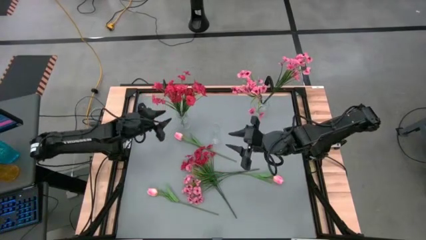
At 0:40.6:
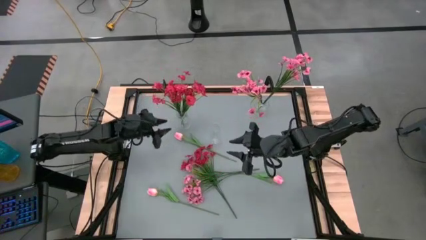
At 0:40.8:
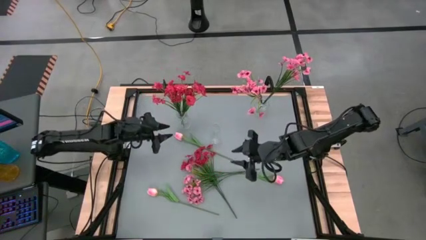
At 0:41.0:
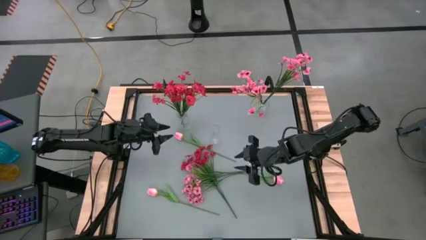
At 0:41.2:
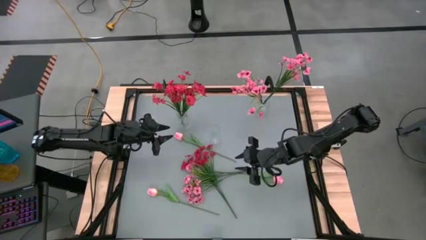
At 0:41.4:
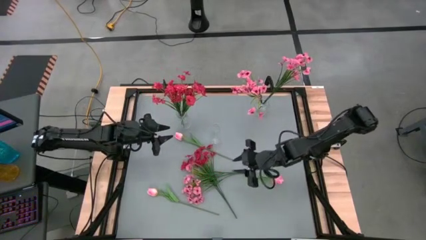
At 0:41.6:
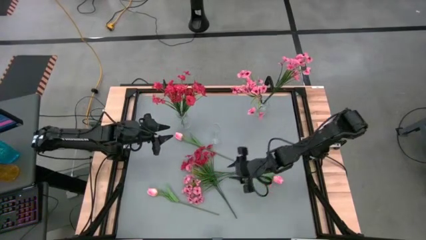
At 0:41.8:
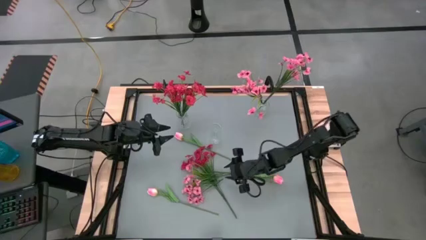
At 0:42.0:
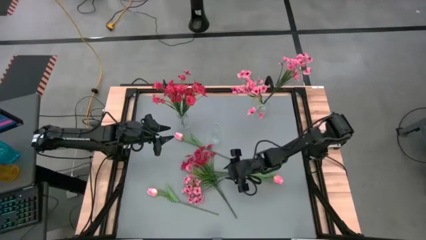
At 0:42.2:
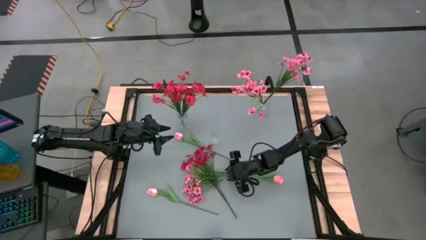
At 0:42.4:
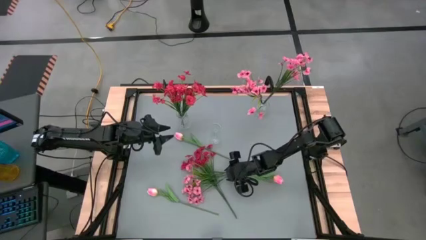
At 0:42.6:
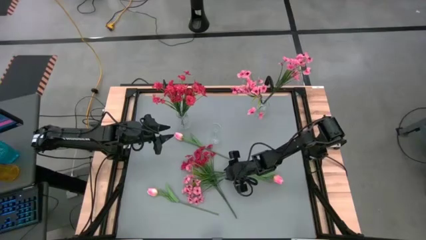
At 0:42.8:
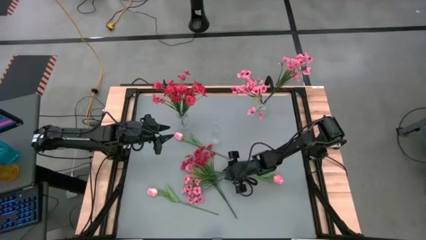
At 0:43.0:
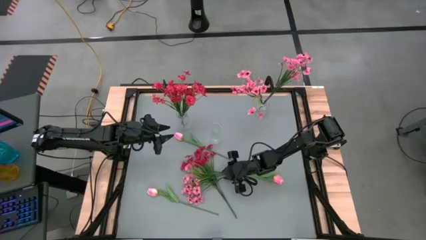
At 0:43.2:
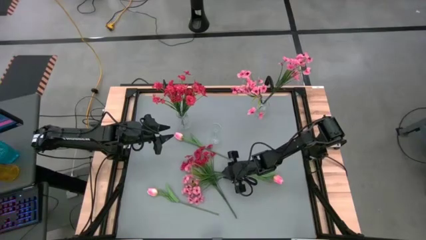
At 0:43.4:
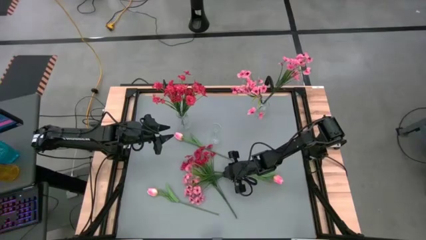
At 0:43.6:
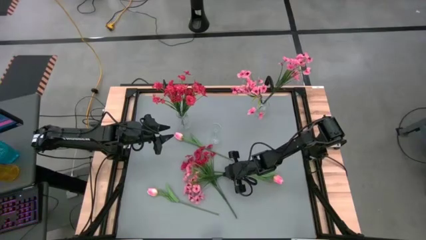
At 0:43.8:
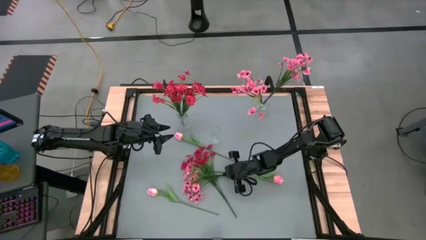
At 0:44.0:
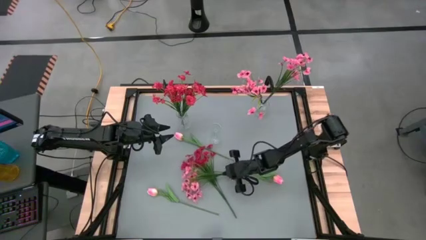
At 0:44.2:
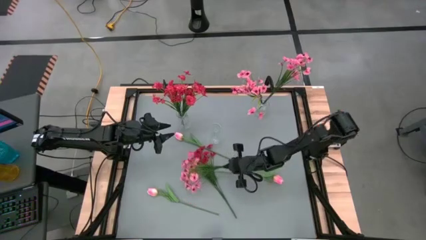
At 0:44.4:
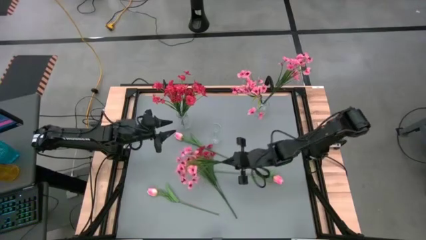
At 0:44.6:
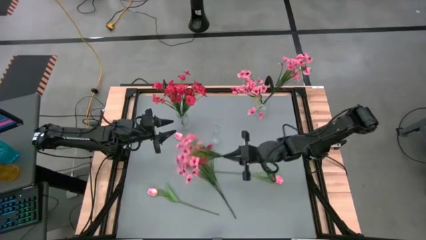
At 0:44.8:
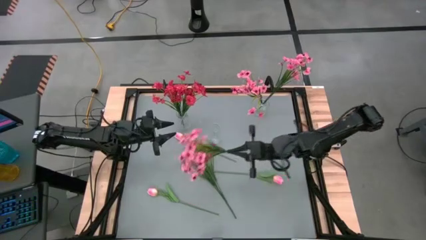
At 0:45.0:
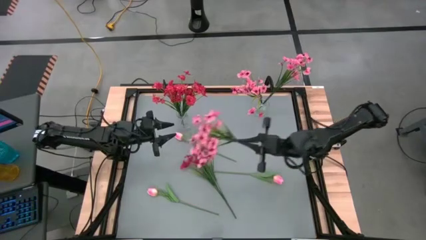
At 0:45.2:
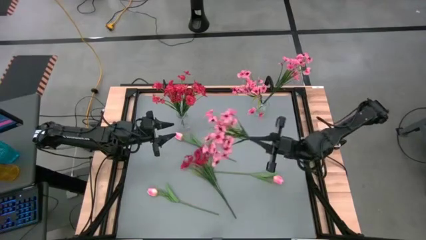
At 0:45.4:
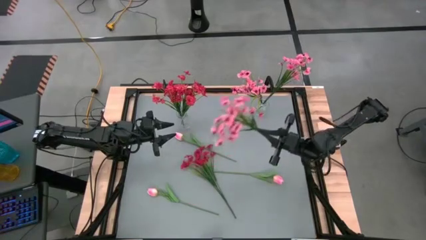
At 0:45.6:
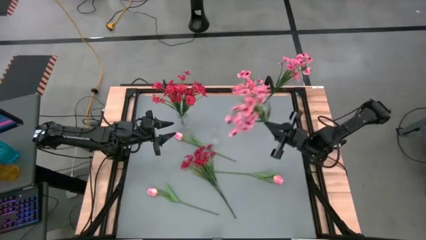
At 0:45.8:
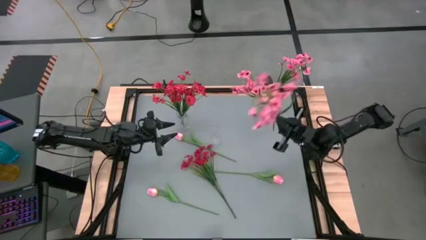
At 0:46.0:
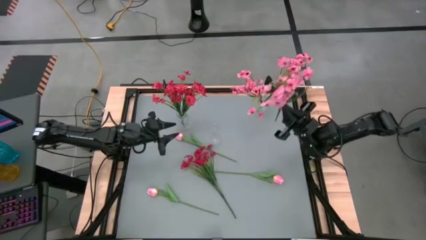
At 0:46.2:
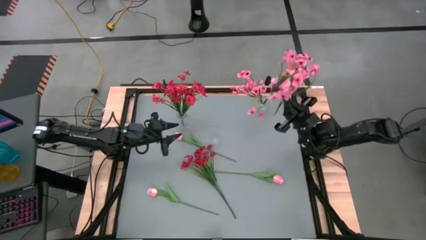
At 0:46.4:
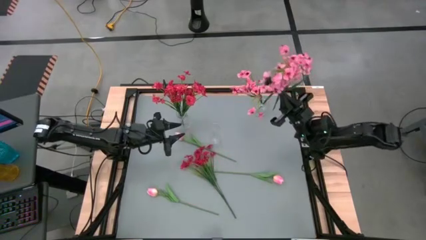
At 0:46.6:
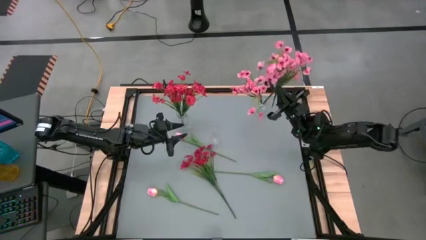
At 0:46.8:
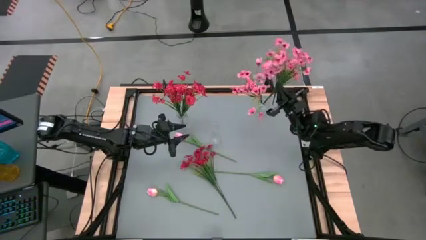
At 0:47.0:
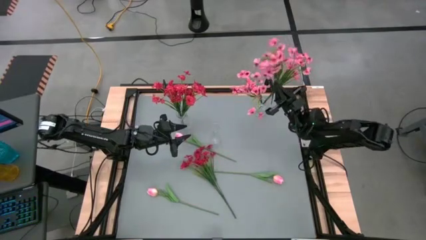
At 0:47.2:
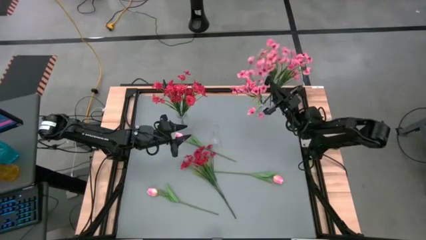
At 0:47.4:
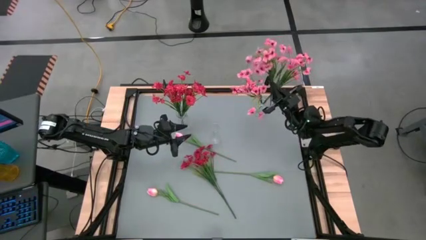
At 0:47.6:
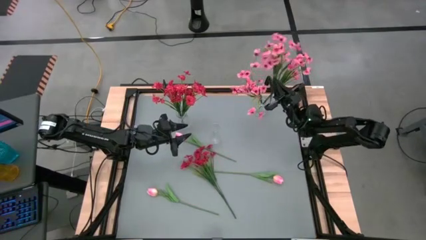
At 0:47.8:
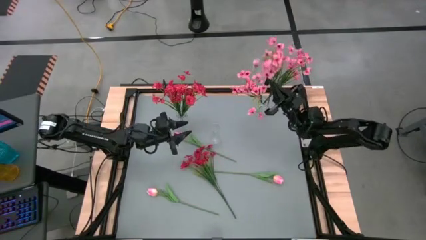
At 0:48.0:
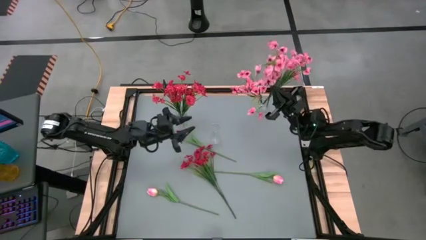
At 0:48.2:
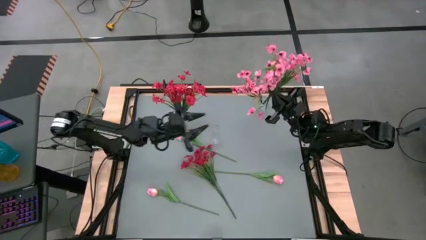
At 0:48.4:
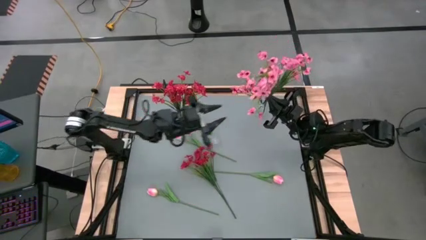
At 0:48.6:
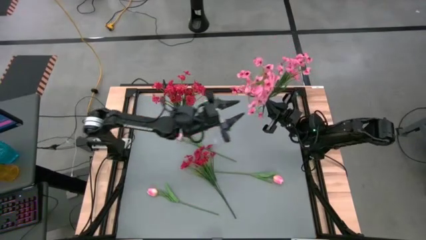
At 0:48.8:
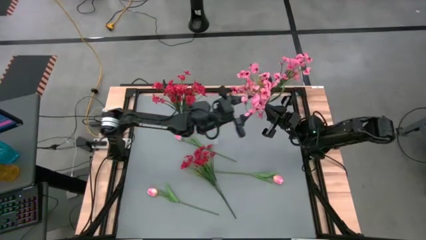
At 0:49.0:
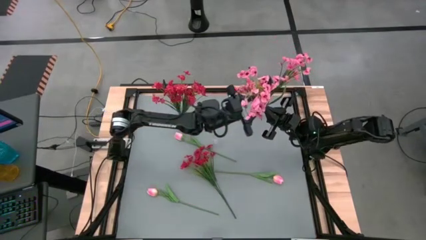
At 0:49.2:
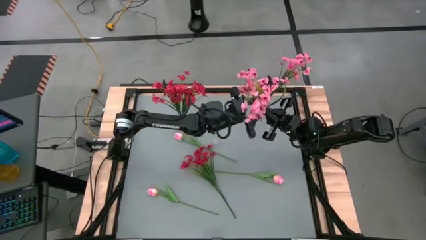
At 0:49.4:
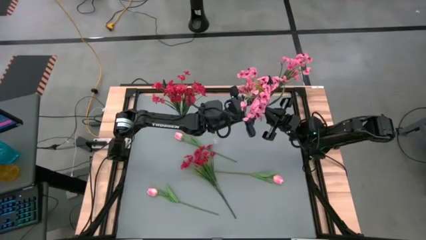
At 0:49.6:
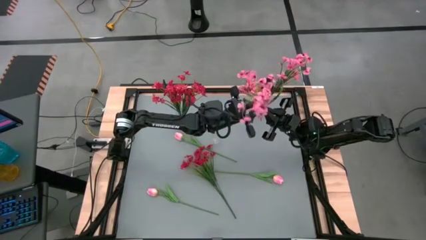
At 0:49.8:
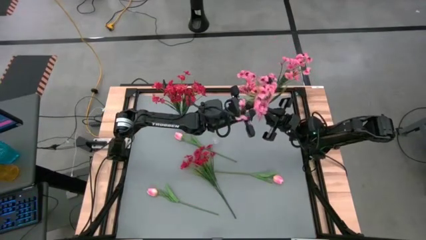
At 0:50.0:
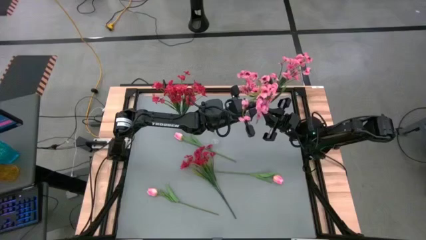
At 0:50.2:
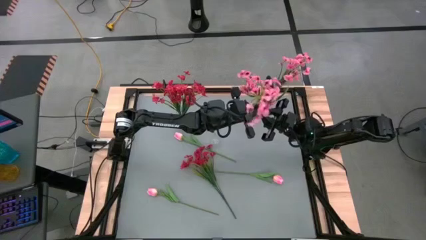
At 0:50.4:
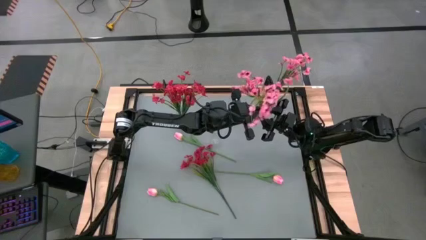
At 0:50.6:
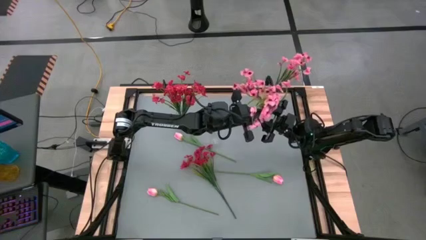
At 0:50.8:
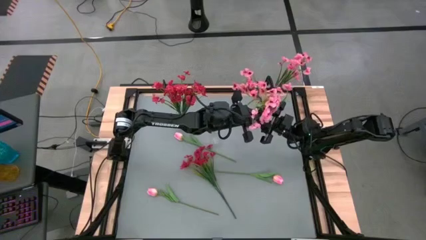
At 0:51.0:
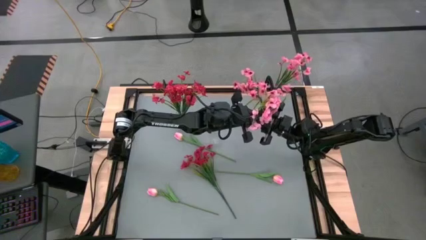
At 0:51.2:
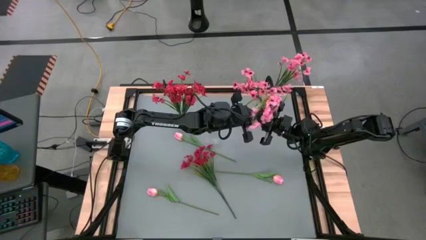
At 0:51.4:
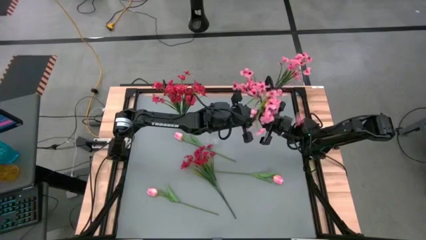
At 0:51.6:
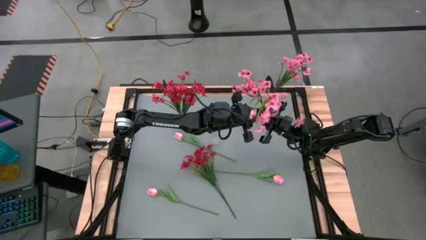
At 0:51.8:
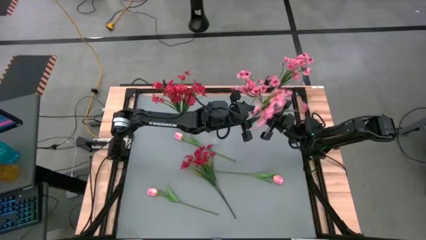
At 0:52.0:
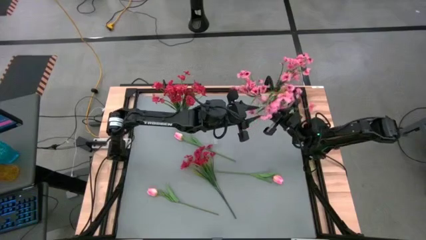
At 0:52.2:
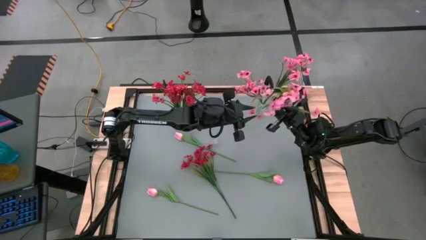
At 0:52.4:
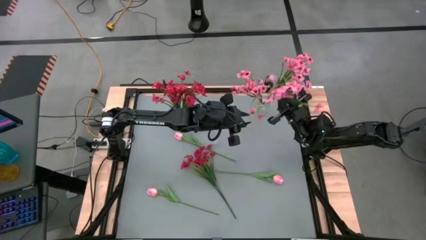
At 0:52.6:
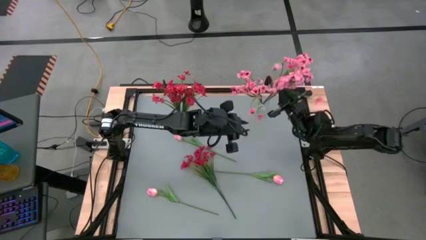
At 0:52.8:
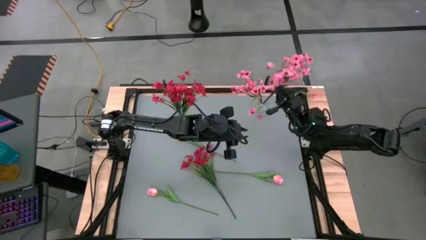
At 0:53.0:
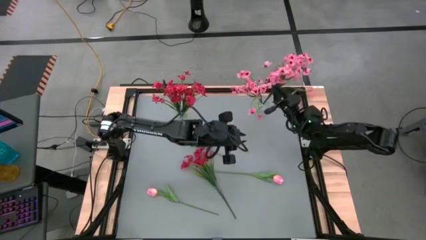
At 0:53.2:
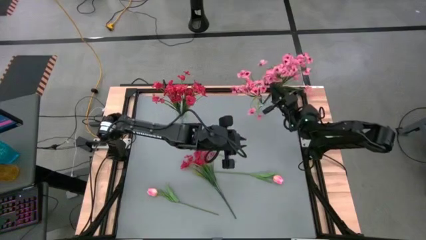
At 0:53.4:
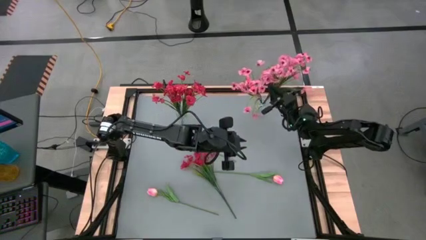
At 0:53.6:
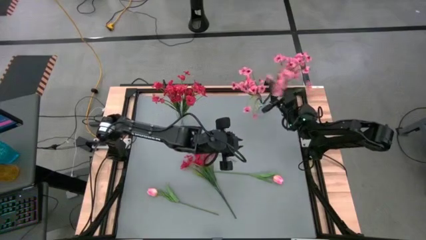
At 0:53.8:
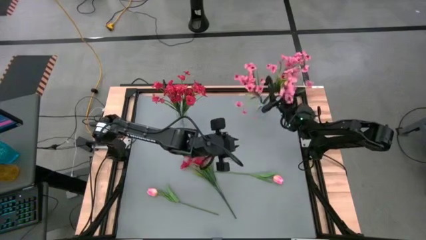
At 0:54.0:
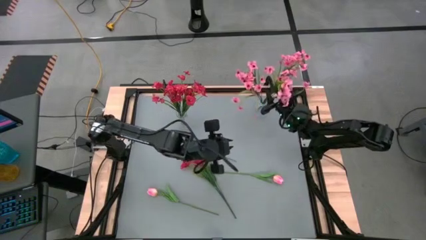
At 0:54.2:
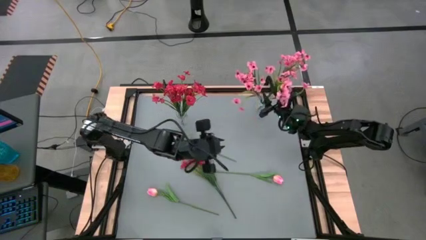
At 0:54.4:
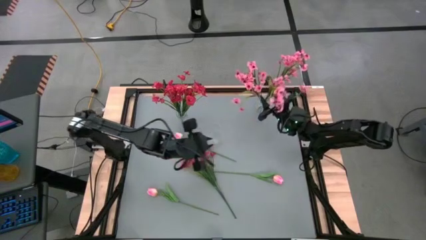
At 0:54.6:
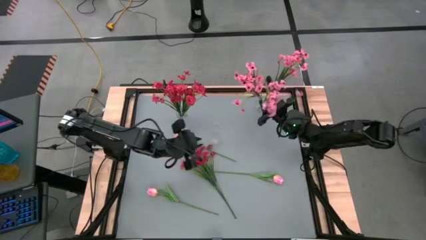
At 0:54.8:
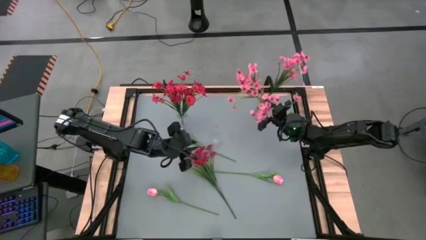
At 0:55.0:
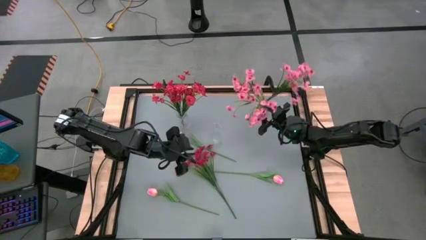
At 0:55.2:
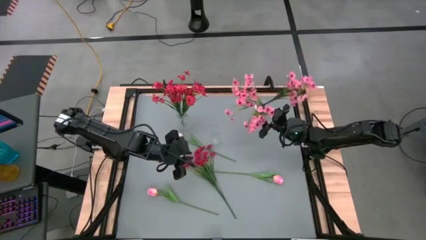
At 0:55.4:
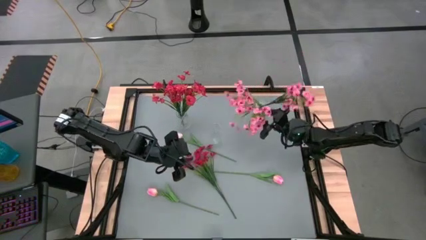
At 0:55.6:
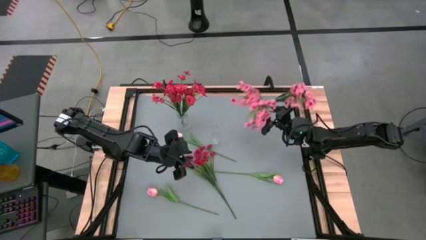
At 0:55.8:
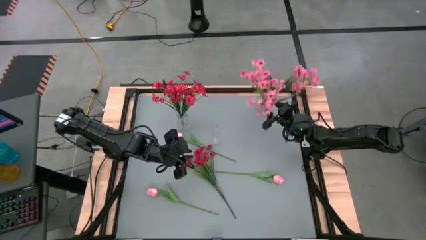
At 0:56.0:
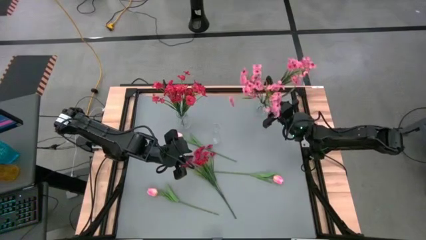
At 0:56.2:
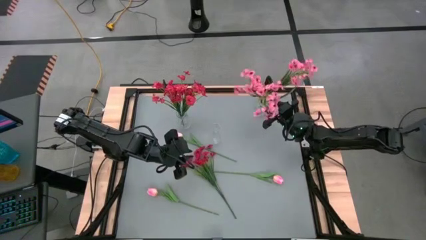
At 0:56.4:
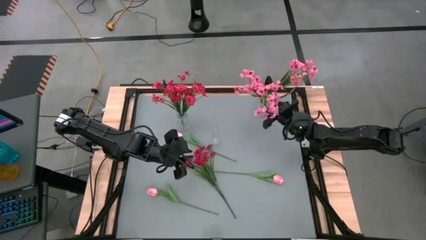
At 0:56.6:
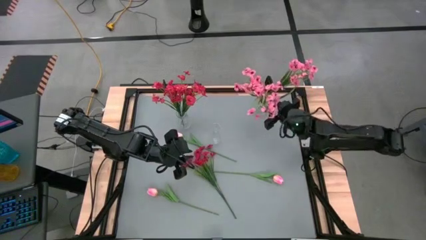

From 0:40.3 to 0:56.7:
Task: Sort flowers into vase by color
Put the pink flower into the top right transparent vase
